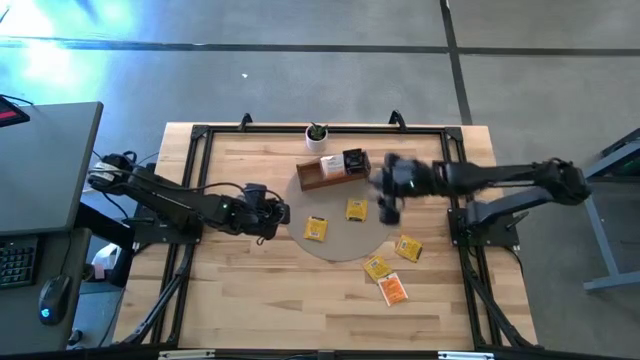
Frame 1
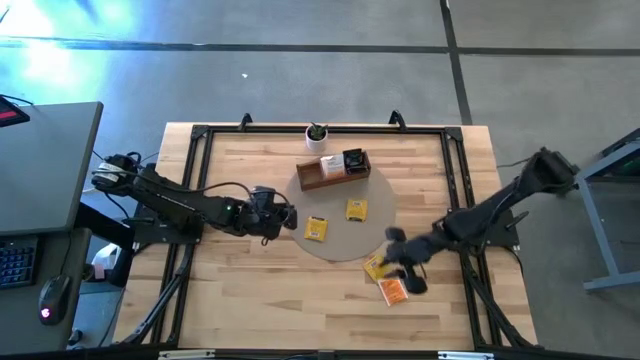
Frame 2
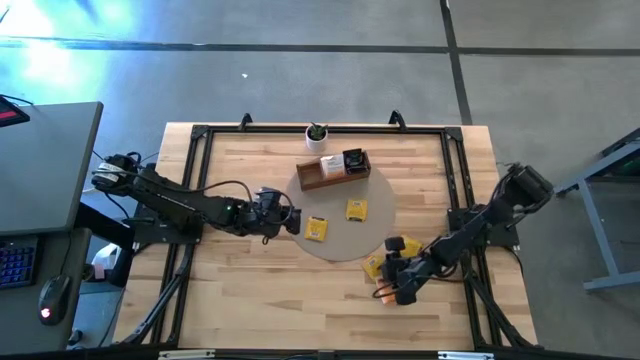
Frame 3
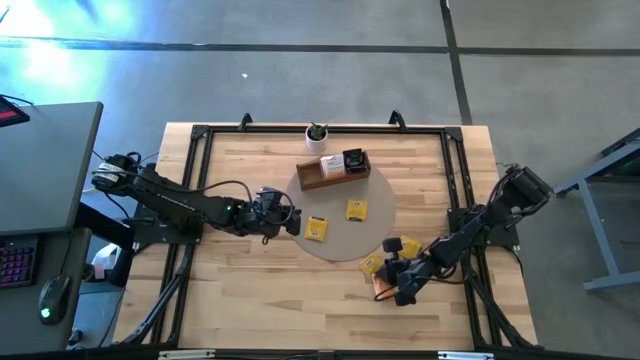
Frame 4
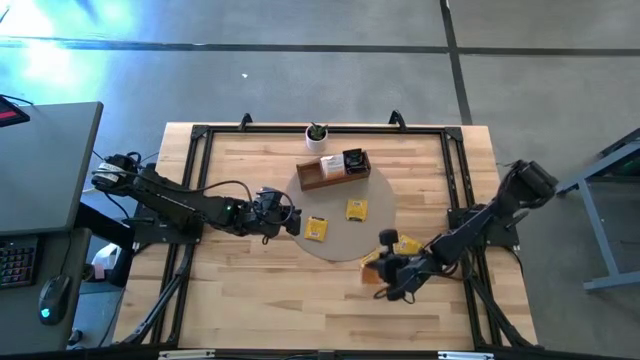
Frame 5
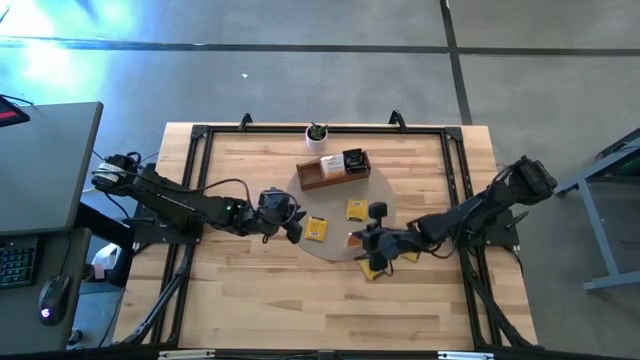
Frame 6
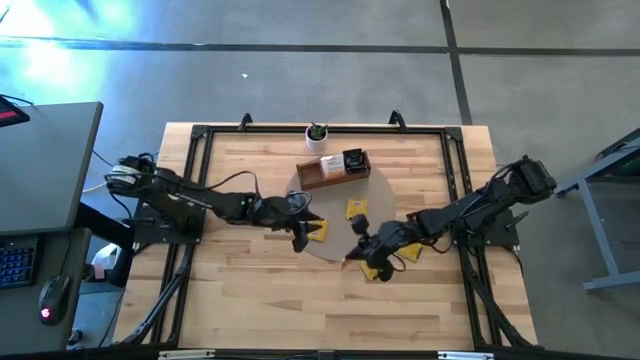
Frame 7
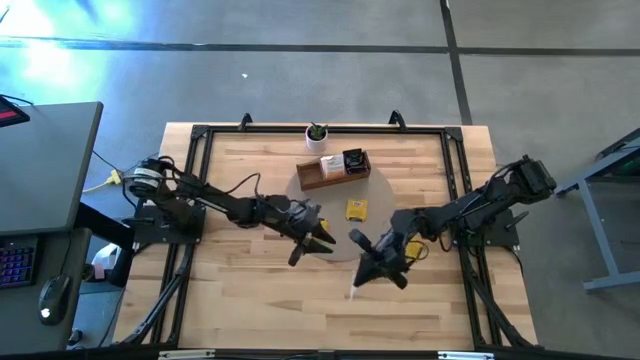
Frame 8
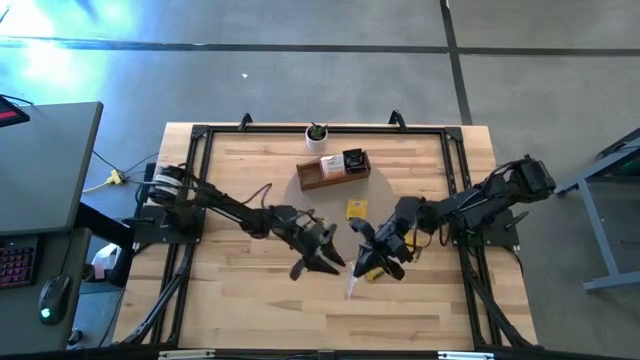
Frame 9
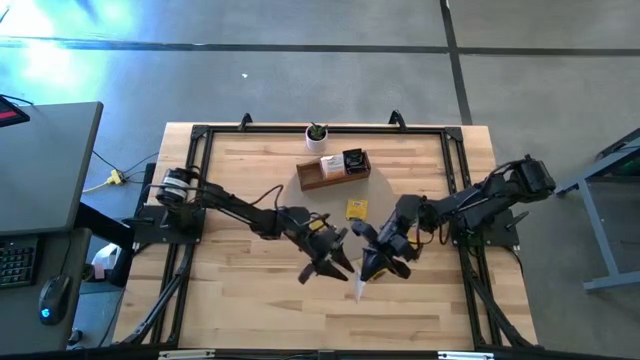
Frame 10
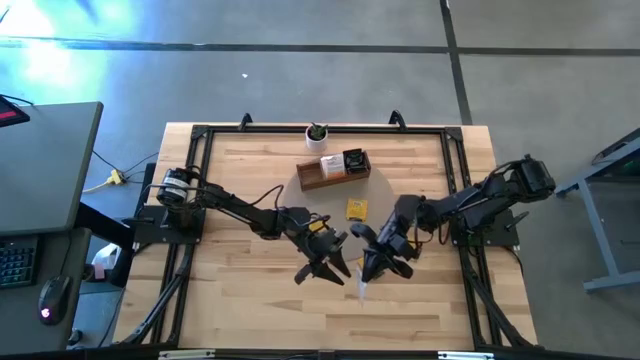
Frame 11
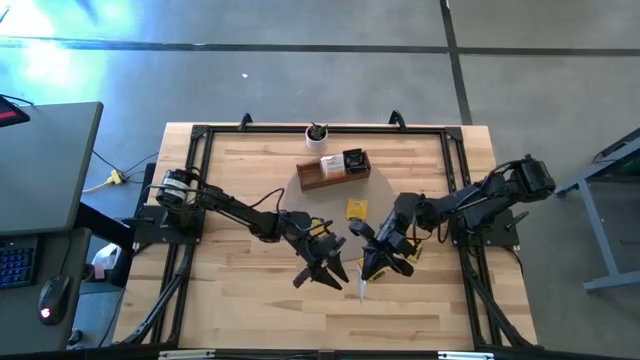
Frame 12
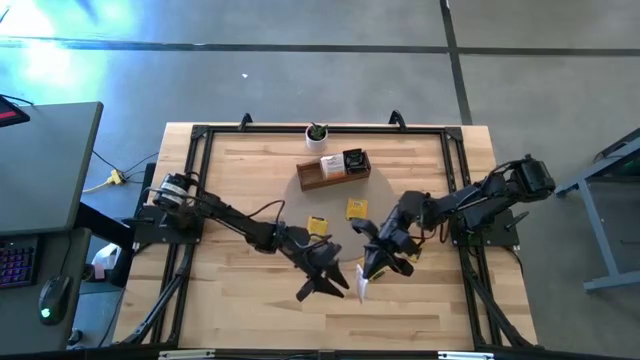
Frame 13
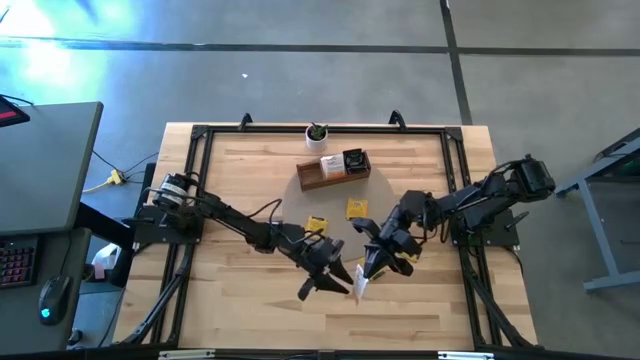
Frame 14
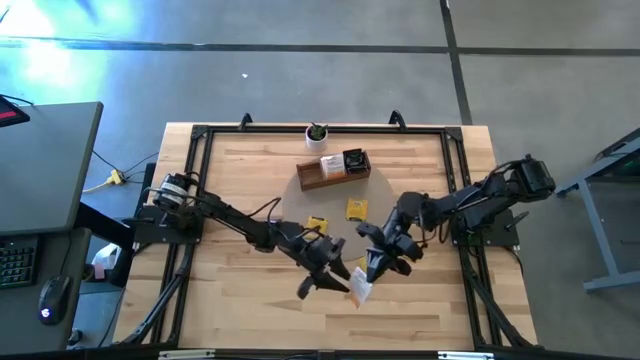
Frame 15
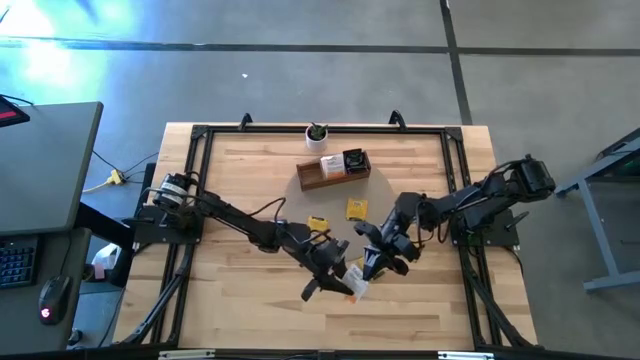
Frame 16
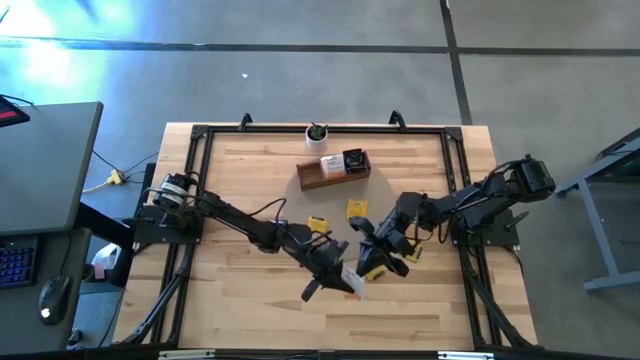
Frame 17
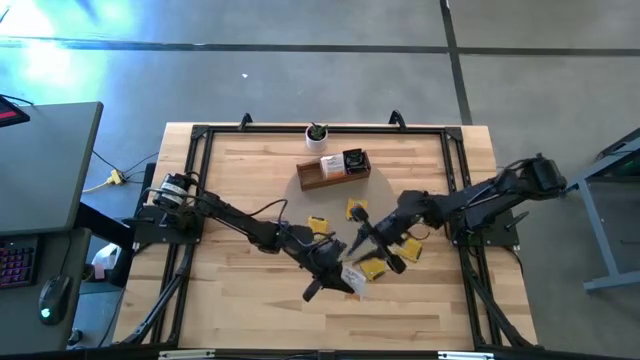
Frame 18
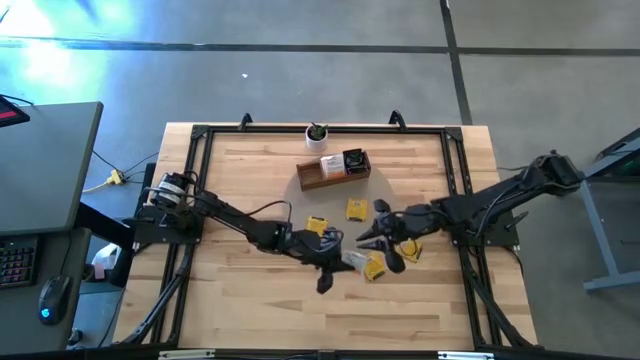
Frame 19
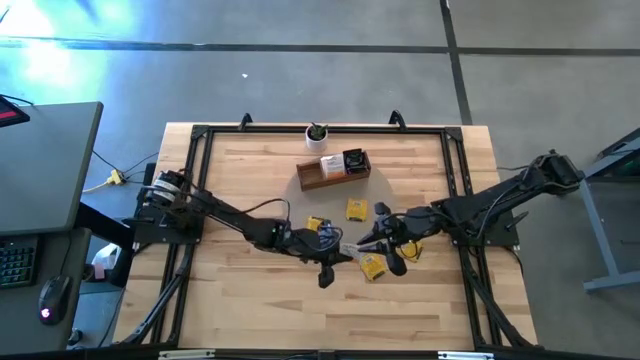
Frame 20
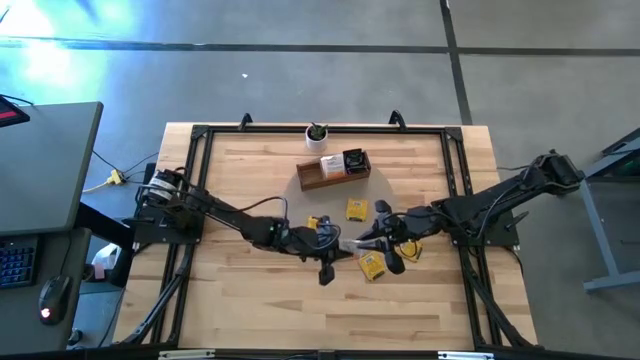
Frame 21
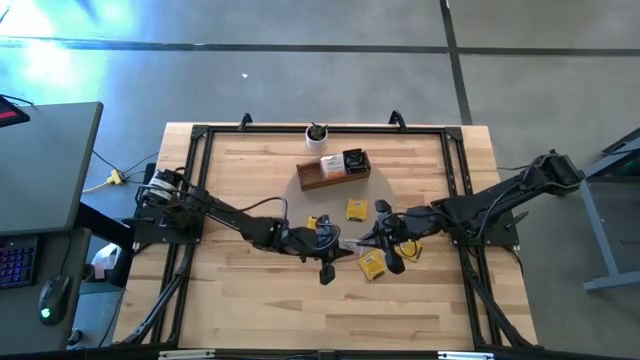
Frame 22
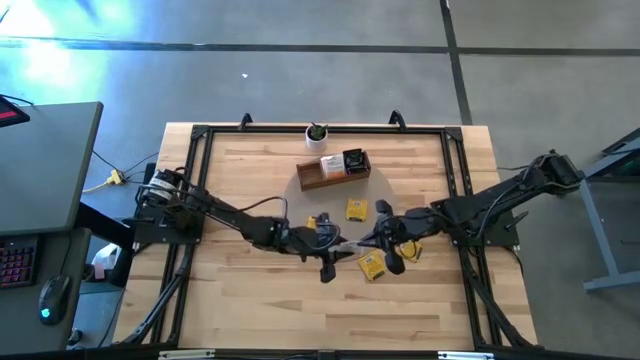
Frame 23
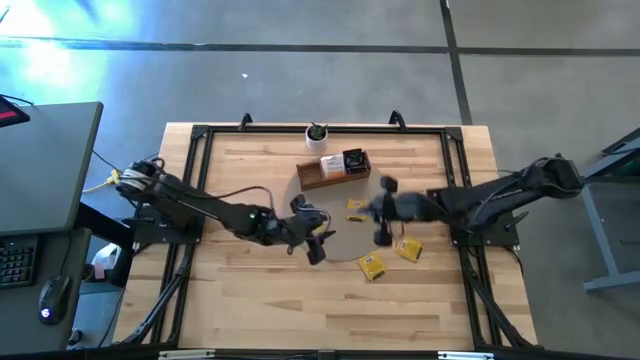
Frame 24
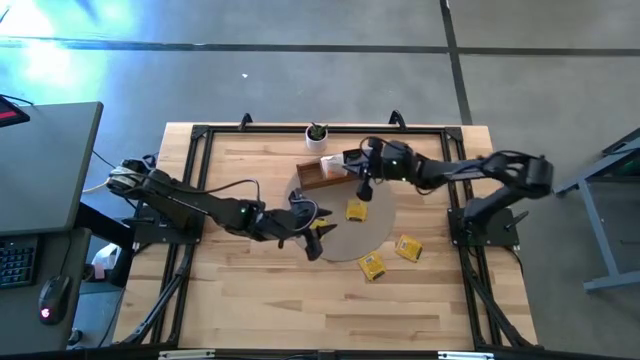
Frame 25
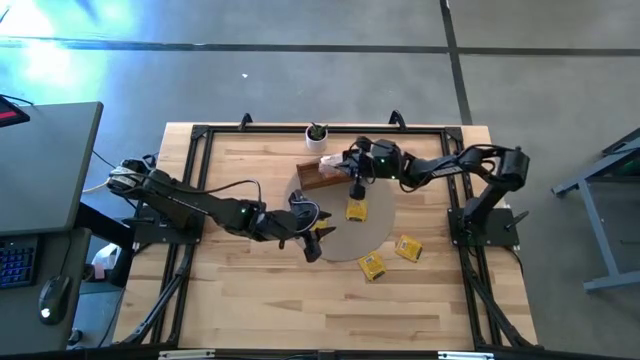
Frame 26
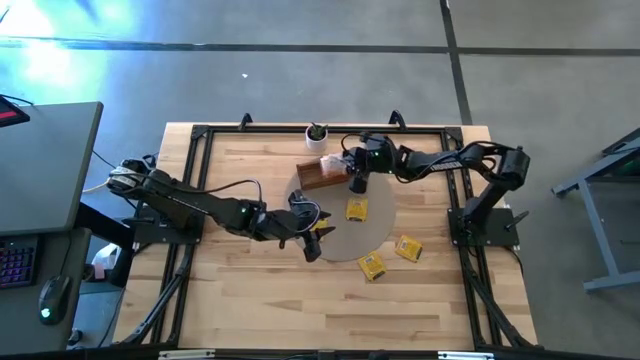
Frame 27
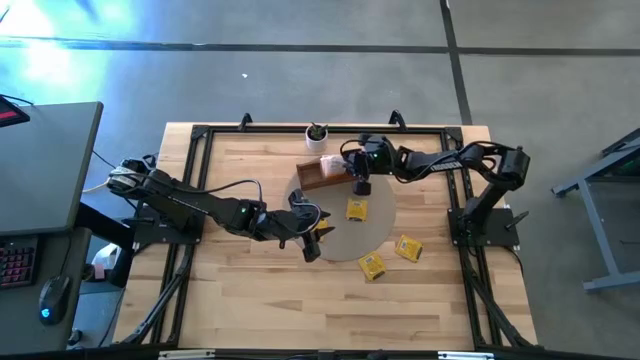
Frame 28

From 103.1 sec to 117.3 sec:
Task: Pick & Place Tea
Put the orange tea bag into the middle section of the wooden organizer

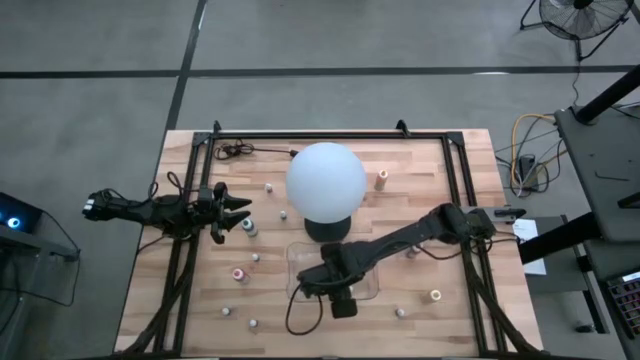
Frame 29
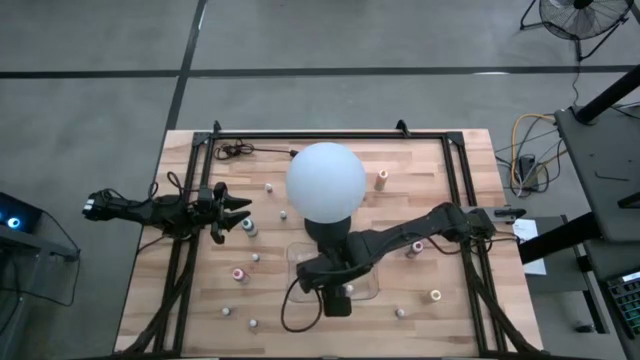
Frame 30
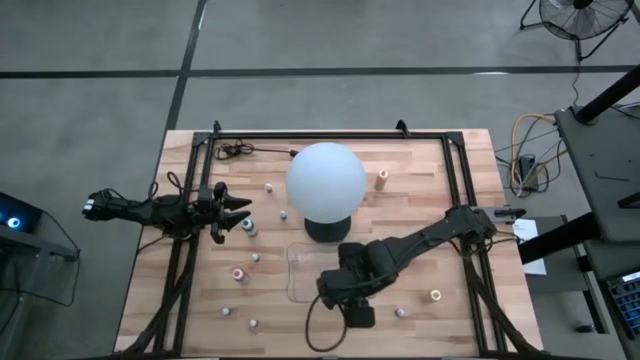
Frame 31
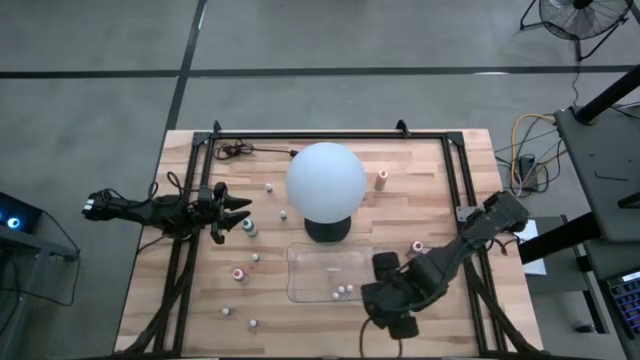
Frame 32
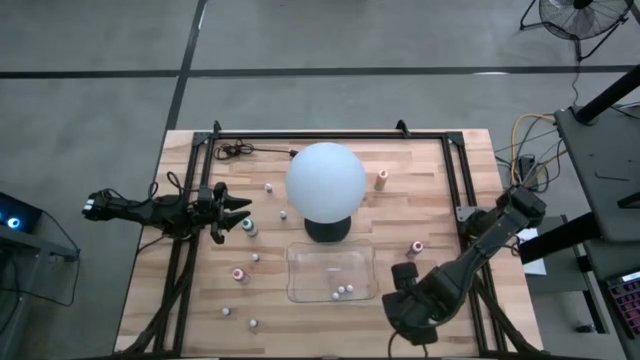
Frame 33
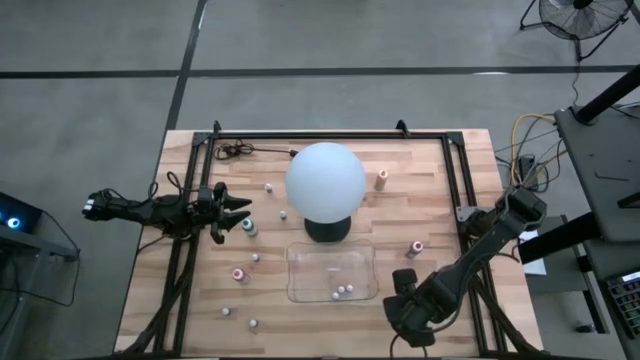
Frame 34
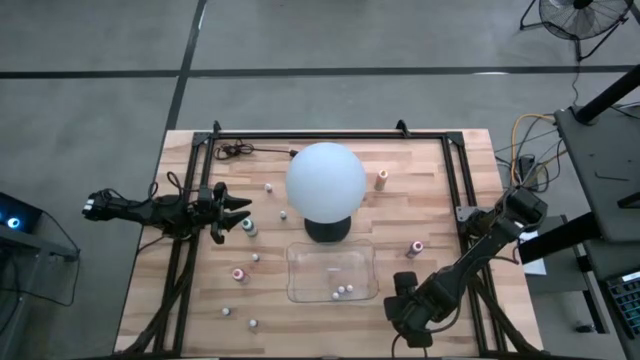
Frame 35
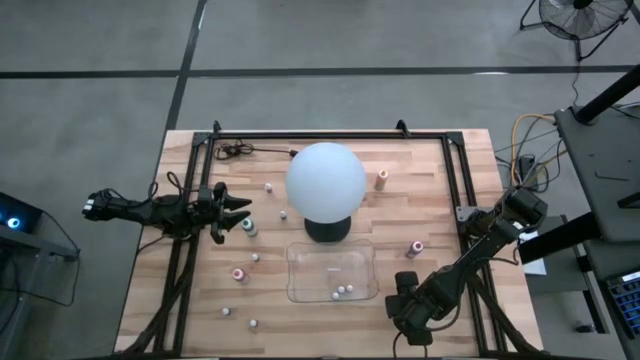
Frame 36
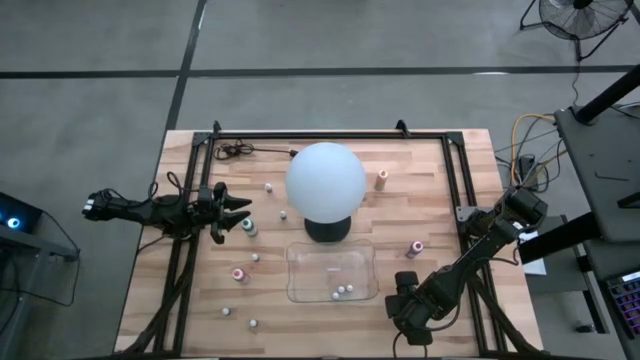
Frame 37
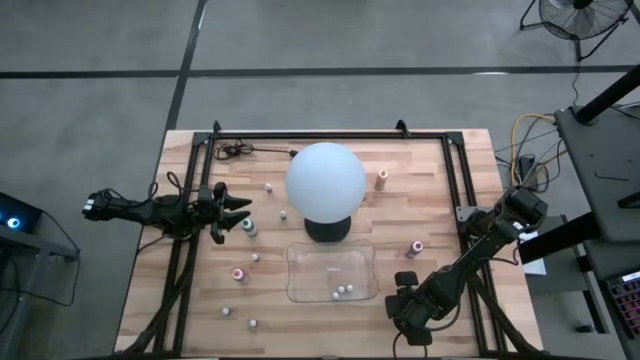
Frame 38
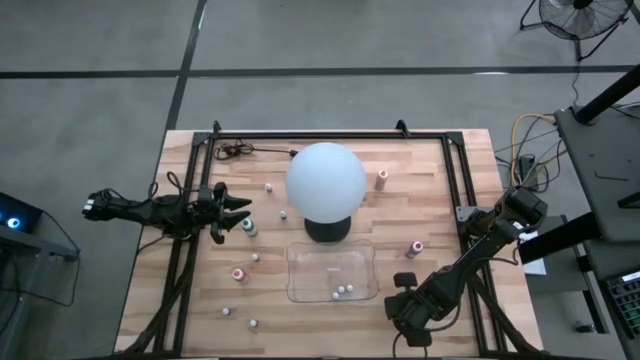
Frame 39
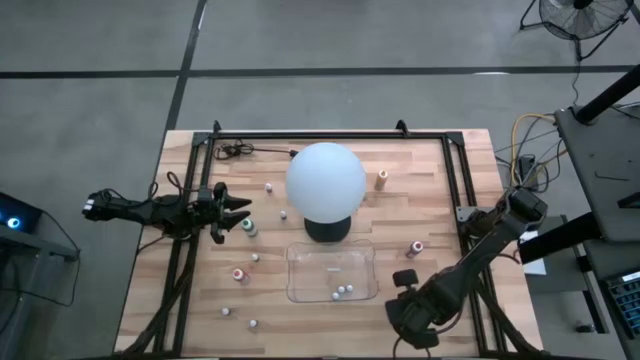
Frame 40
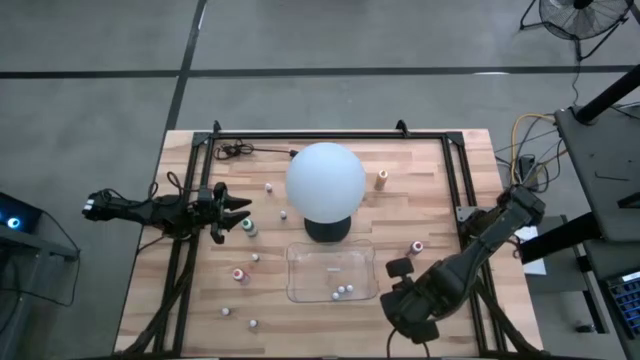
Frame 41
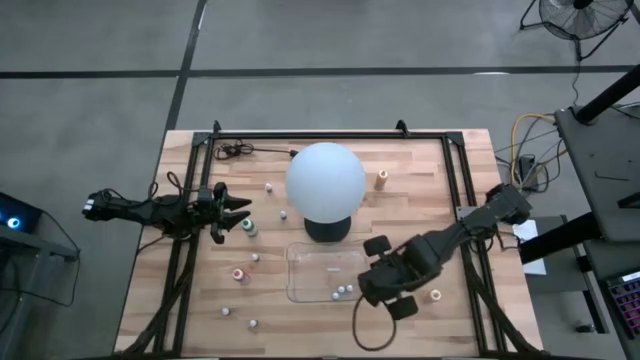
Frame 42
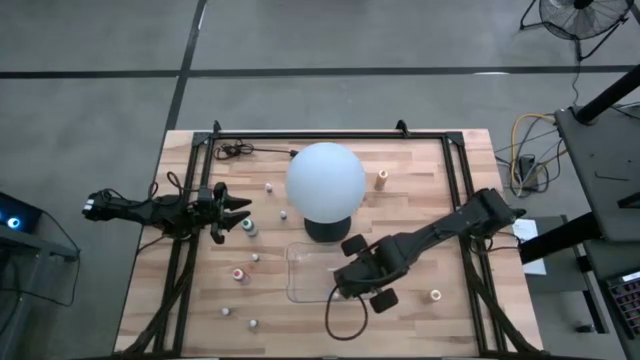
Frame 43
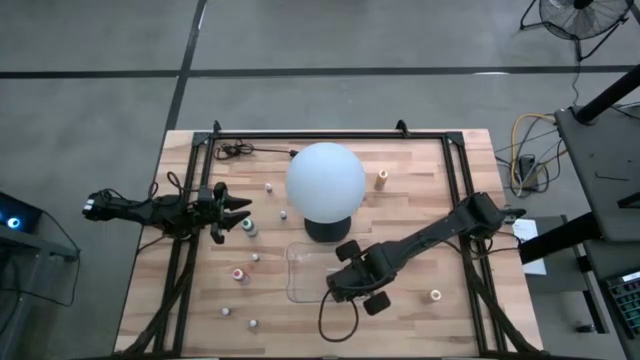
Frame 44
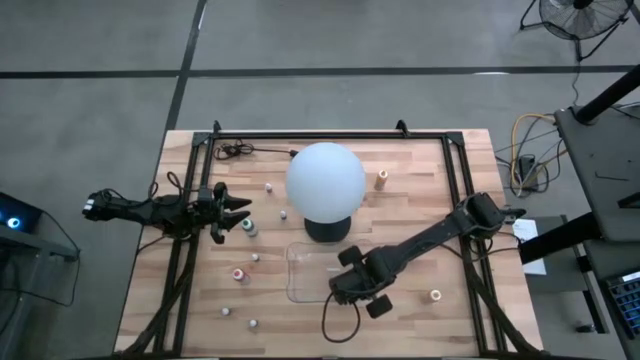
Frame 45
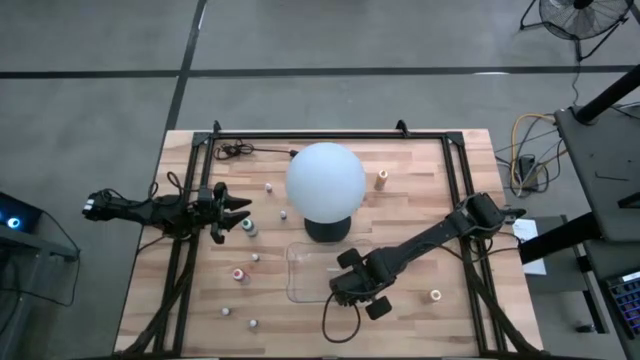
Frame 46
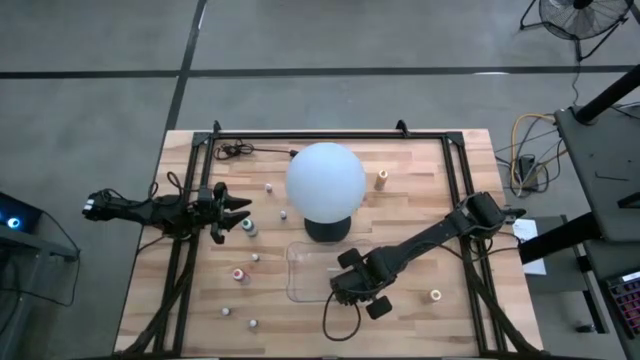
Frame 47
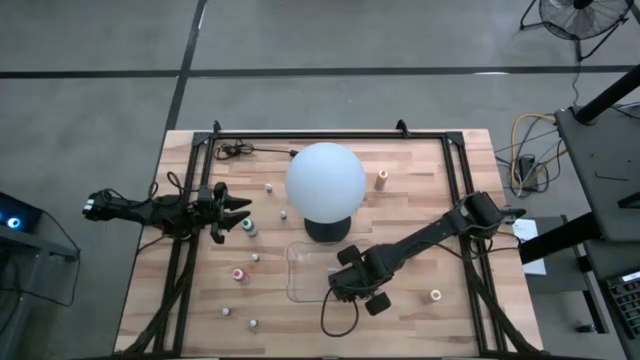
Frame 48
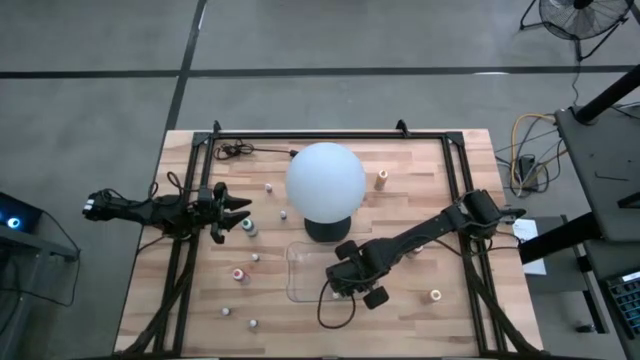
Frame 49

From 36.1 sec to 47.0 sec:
Task: Pick & Place food coloring
Put the small green food coloring bottle into the transparent bin
